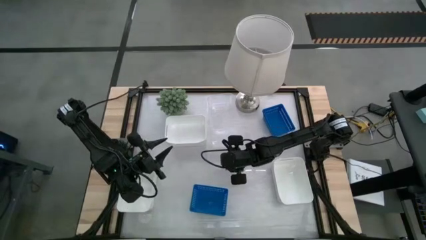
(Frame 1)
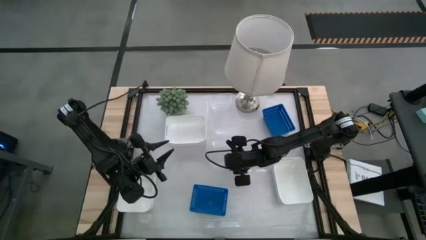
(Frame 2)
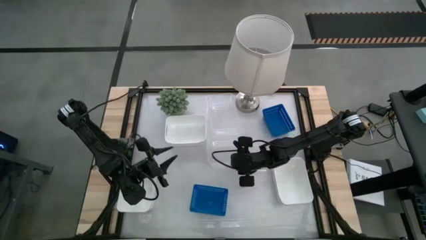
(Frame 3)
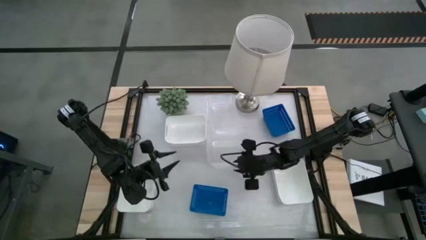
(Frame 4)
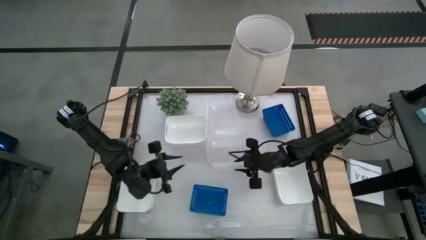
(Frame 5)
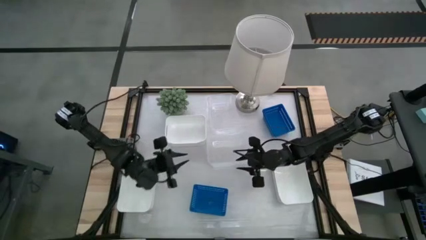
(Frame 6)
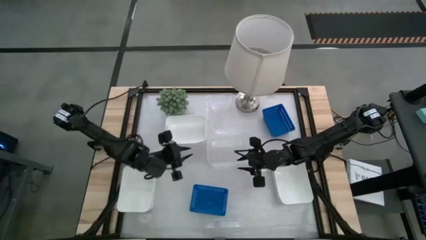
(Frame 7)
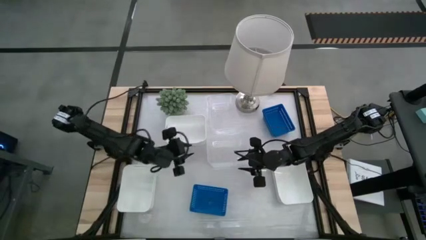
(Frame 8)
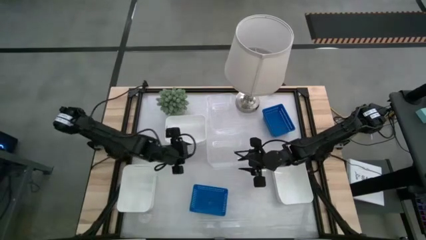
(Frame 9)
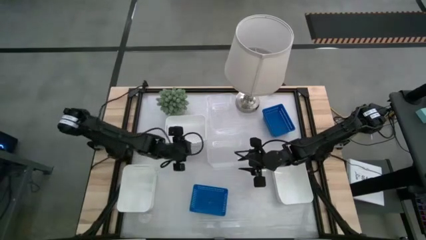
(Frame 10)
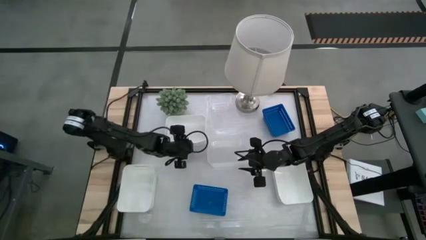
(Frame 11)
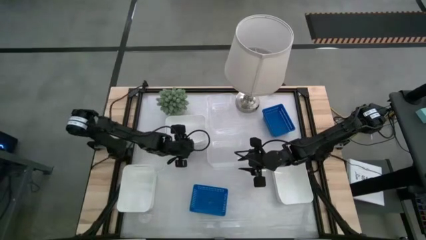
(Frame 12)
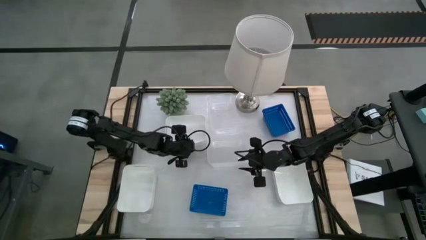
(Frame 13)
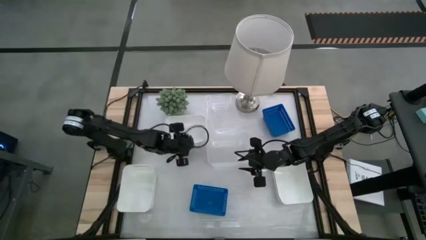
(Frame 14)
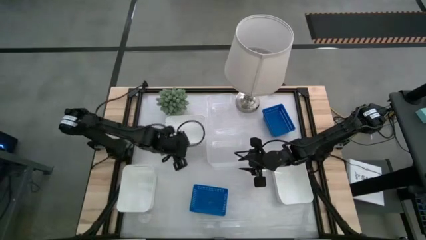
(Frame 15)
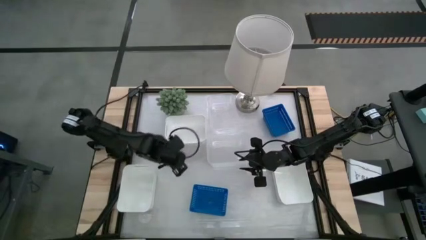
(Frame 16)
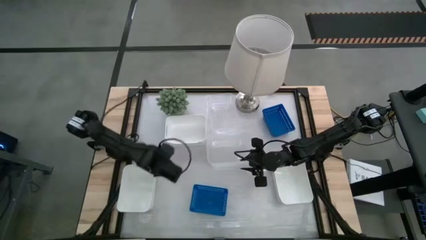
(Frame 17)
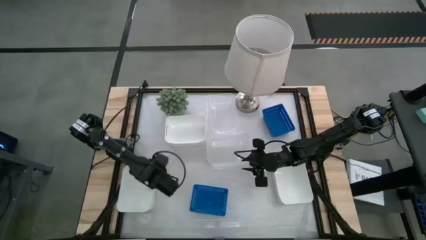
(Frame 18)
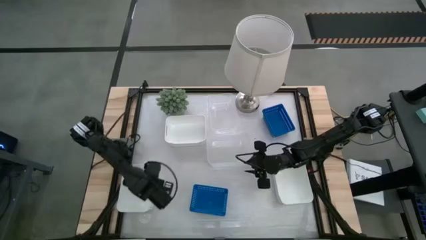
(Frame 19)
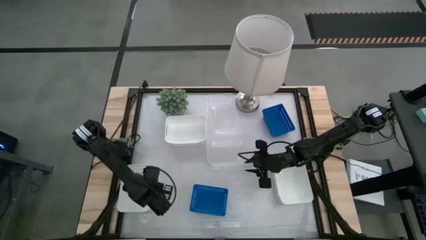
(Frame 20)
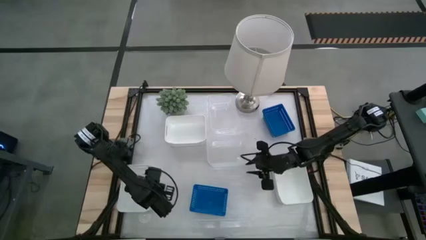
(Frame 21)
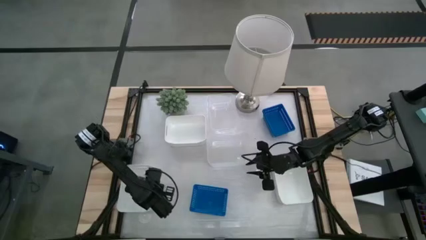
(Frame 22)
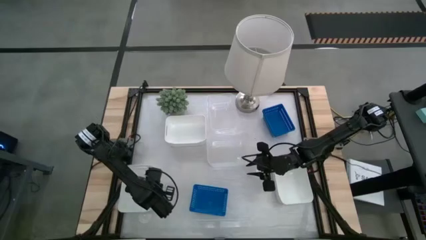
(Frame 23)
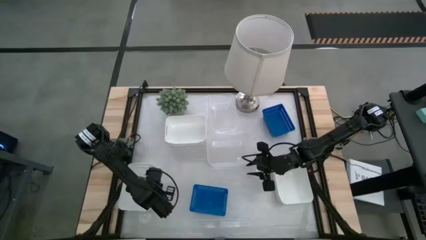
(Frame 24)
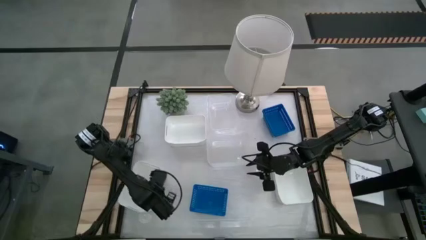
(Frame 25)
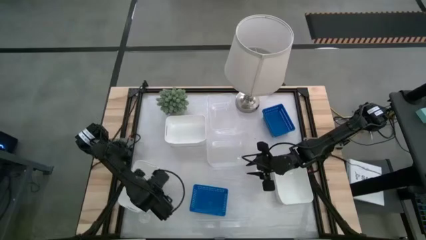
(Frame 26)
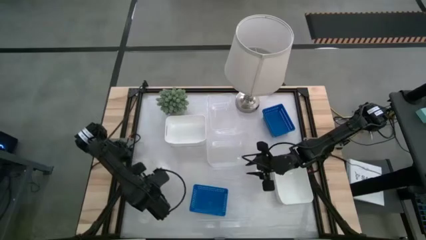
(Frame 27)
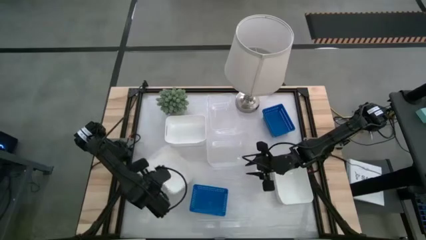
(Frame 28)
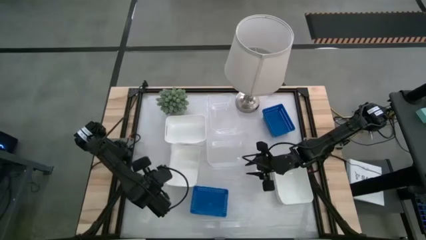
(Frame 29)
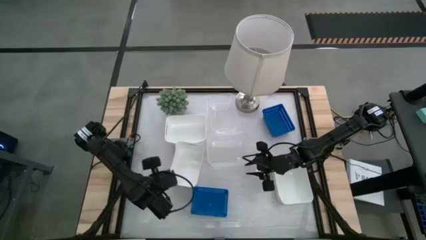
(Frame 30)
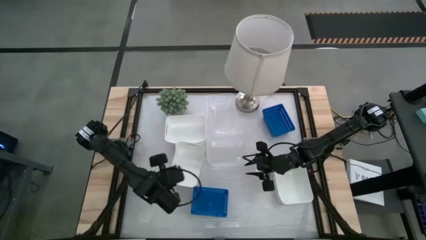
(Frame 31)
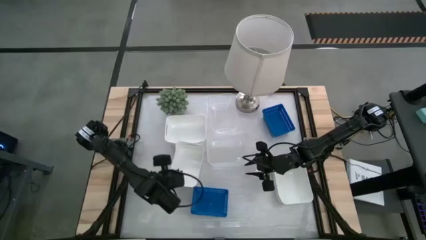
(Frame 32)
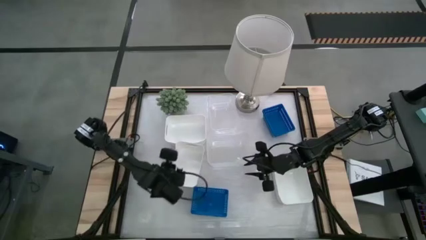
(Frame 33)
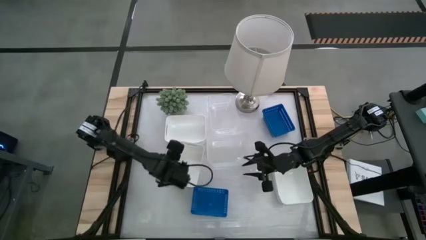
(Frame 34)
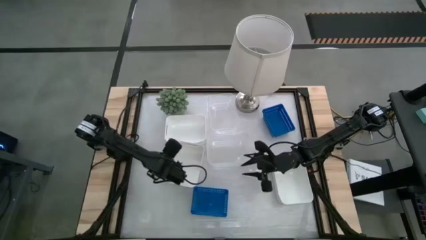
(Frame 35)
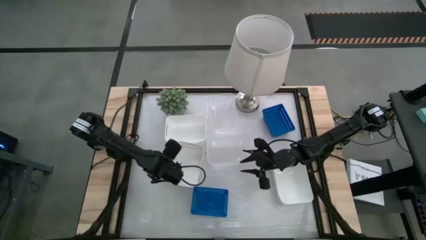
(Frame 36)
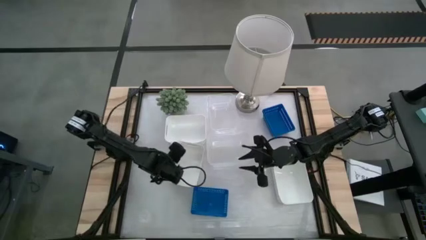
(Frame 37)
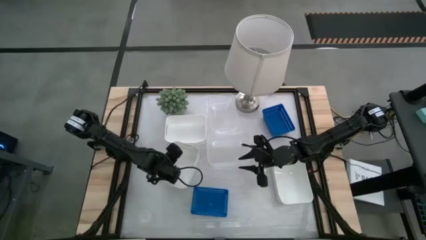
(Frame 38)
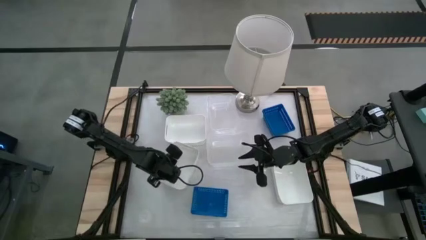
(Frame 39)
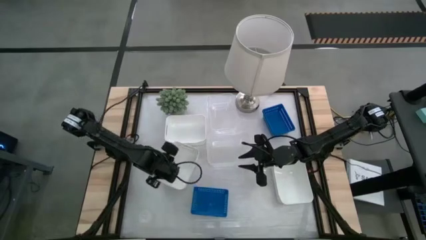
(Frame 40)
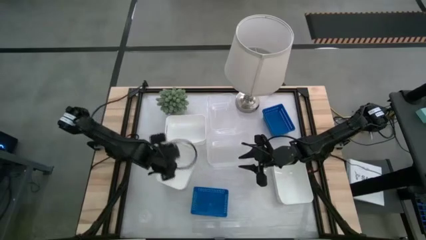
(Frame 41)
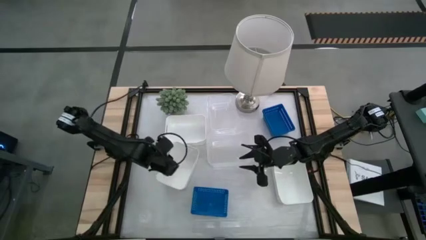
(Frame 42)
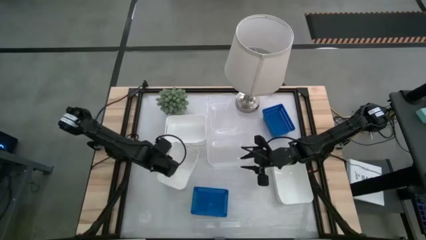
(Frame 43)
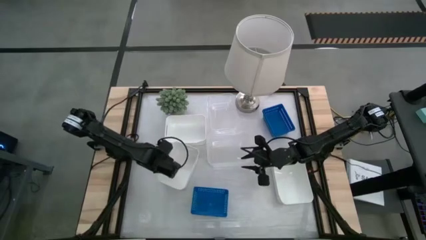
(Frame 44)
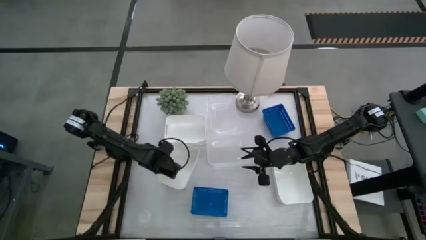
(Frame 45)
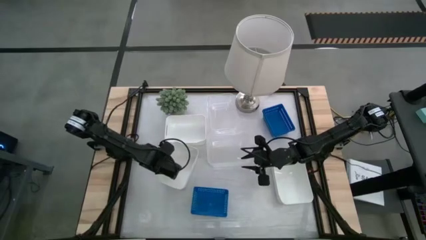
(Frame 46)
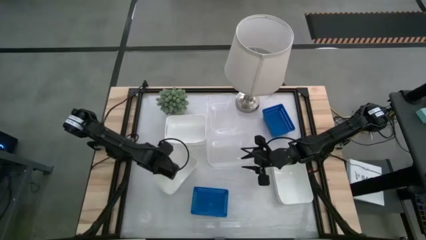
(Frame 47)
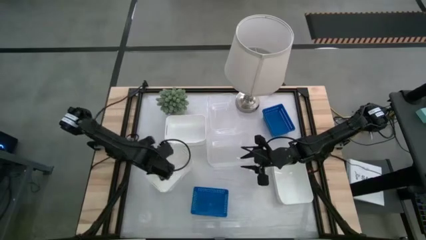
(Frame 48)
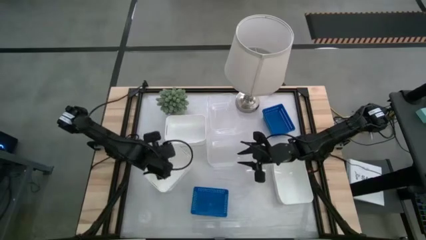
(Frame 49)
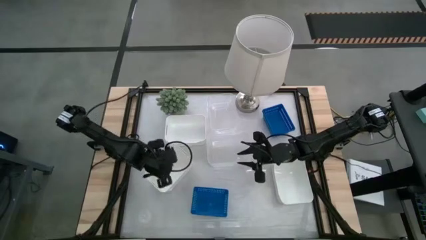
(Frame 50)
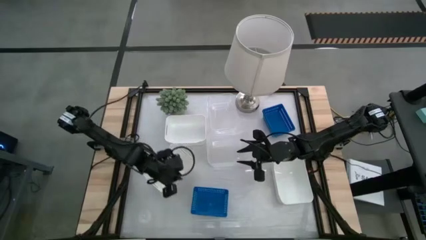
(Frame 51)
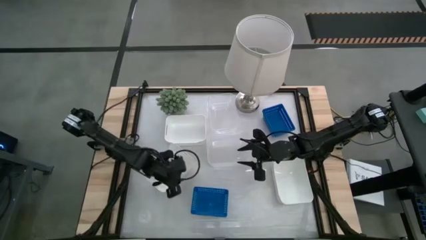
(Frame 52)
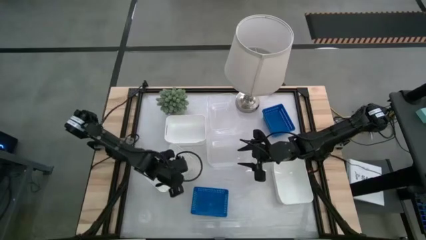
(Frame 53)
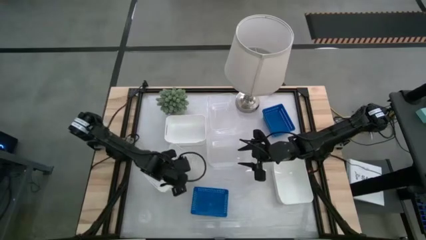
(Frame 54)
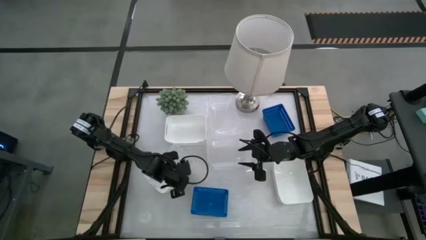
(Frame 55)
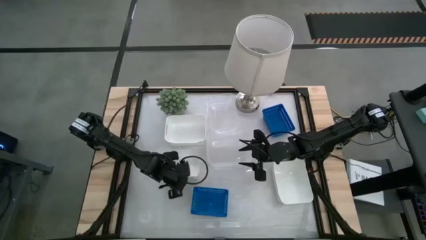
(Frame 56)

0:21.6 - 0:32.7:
Stack the bottom left white bin on top of the top white bin

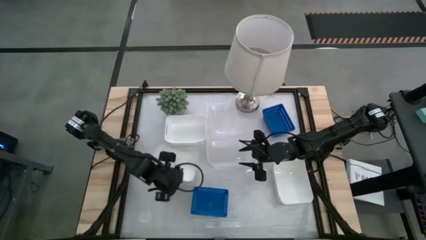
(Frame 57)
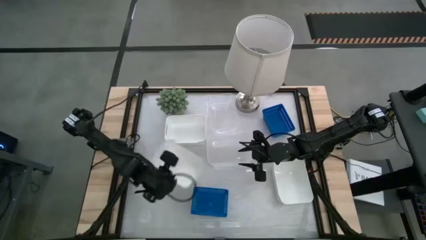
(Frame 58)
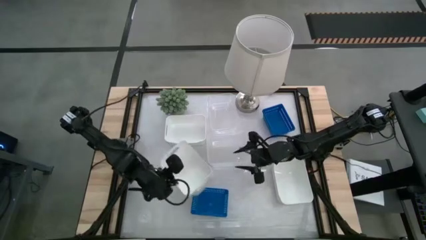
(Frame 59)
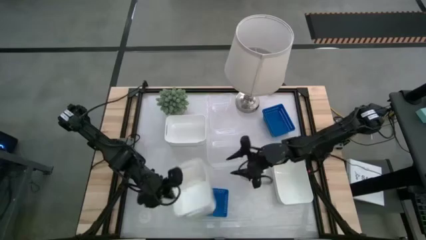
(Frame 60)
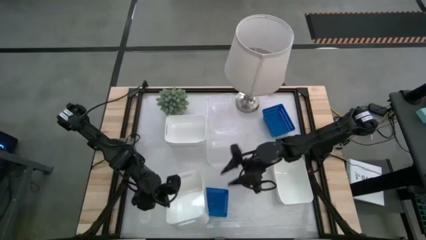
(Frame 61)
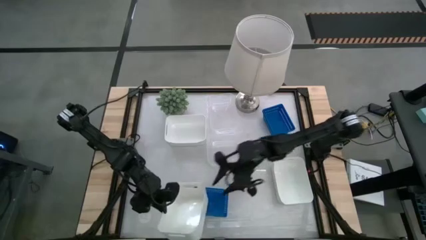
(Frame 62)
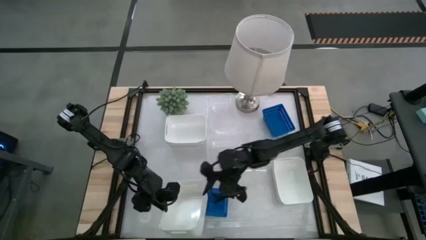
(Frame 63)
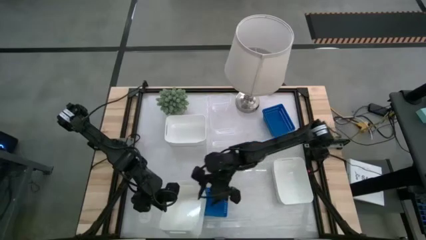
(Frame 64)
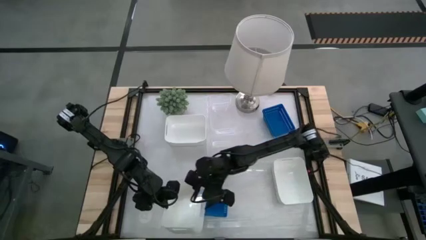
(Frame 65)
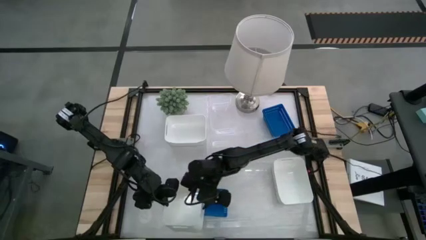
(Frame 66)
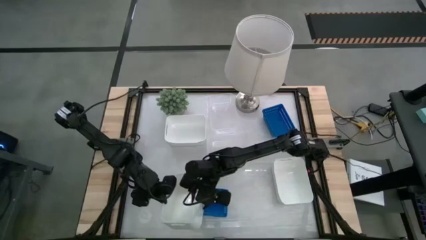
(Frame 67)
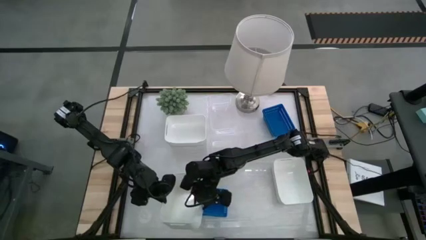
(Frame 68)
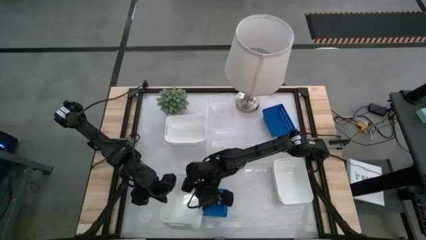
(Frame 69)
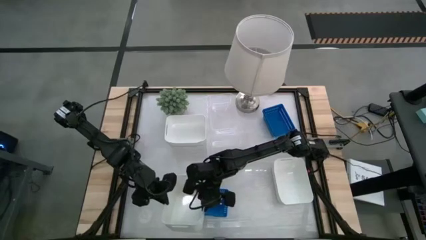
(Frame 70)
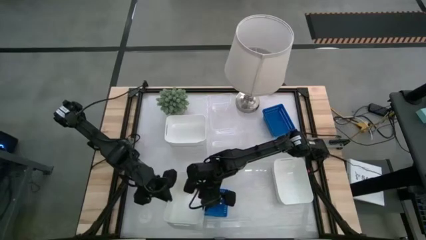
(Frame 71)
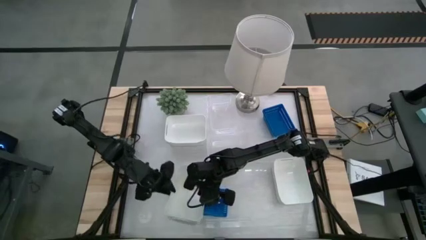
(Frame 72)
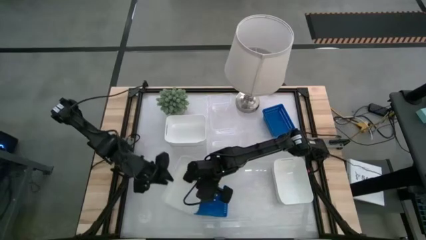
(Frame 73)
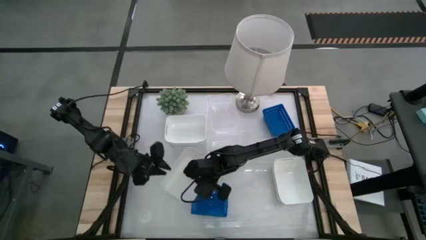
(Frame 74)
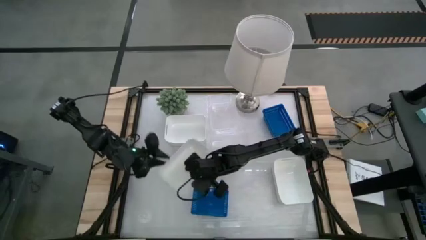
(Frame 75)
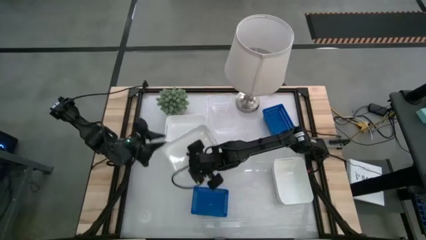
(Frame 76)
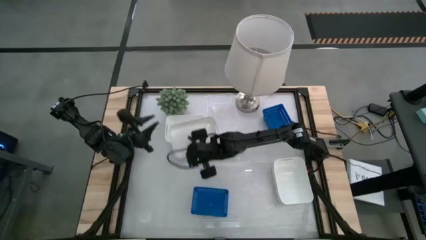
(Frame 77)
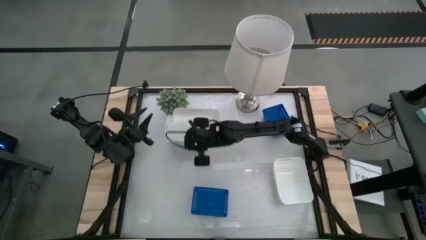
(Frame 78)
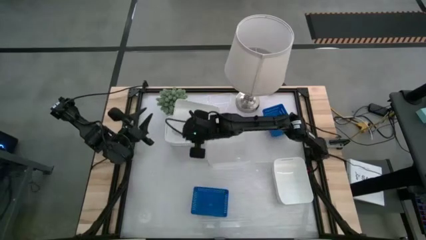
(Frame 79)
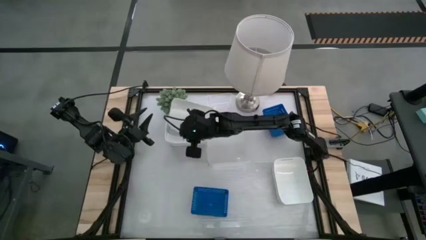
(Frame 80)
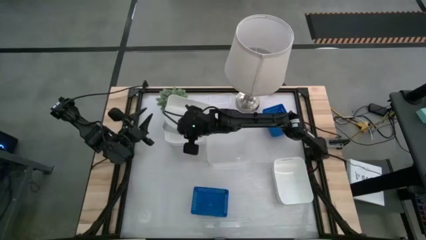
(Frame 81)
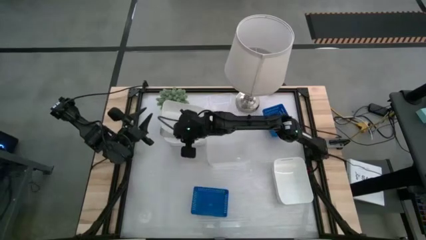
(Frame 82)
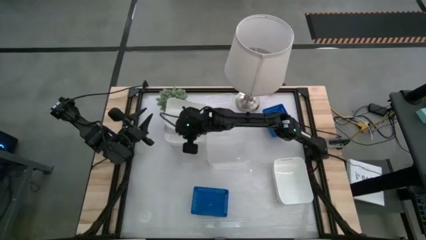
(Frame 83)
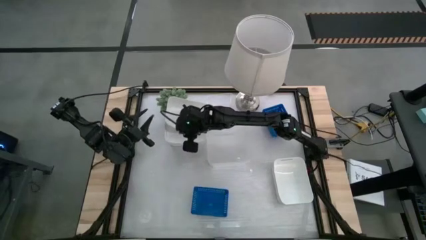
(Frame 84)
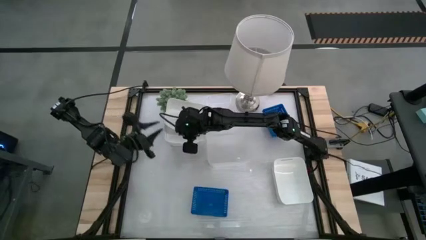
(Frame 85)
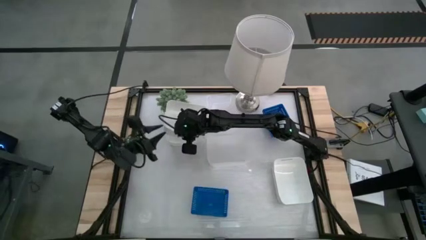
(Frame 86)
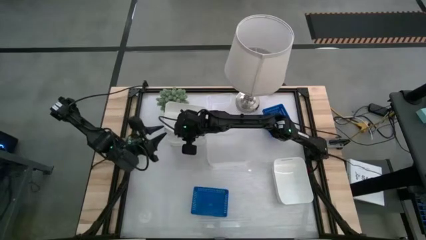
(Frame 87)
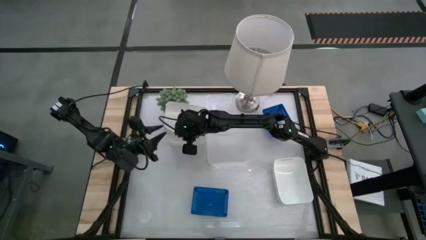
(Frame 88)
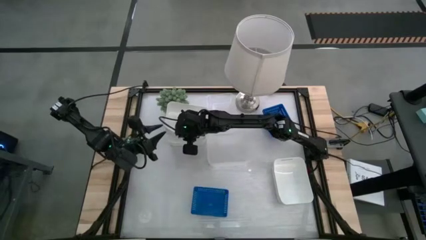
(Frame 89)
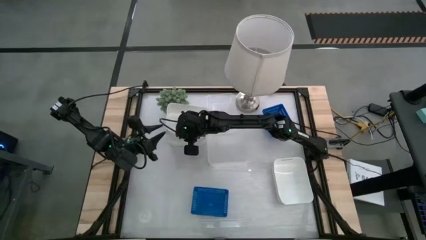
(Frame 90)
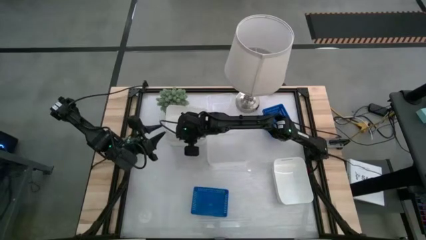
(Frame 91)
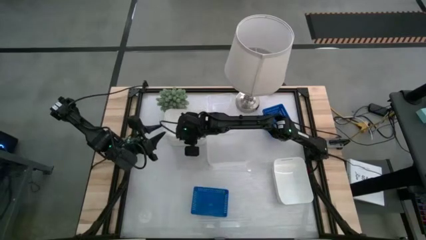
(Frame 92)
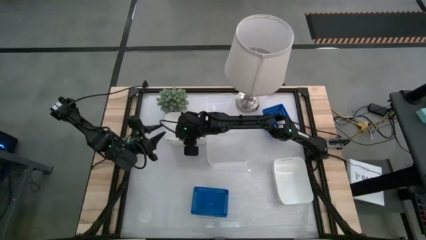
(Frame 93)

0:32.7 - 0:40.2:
Stack the bottom left white bin on top of the top white bin
